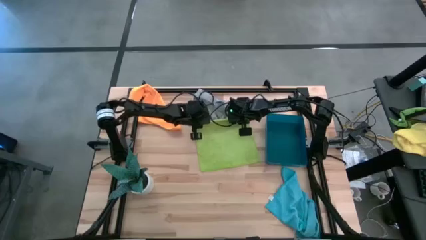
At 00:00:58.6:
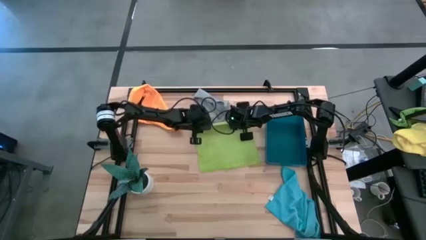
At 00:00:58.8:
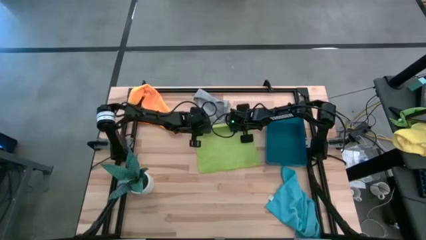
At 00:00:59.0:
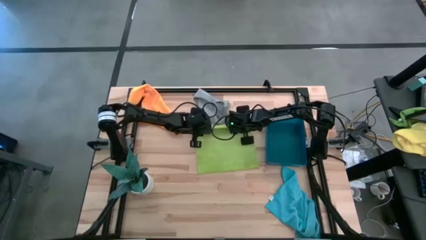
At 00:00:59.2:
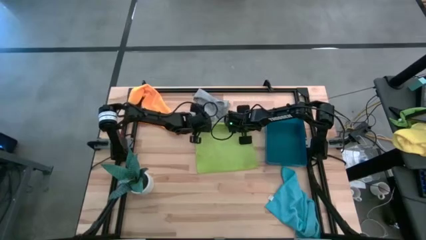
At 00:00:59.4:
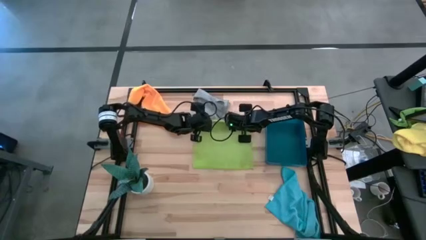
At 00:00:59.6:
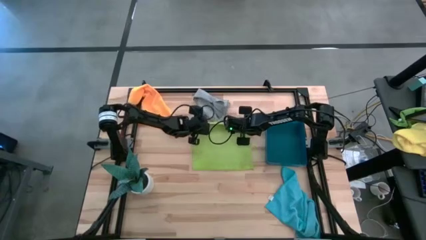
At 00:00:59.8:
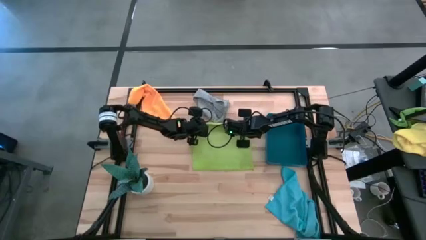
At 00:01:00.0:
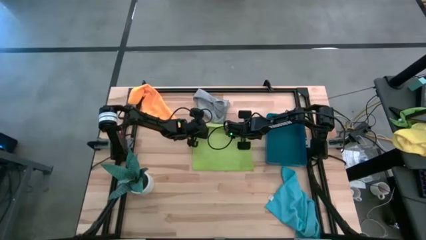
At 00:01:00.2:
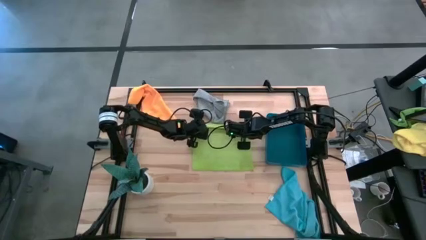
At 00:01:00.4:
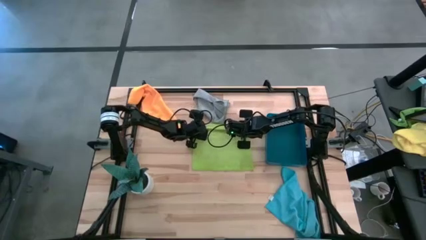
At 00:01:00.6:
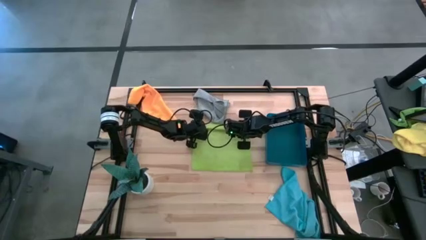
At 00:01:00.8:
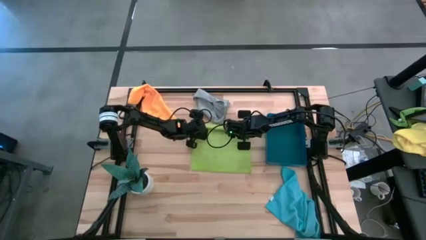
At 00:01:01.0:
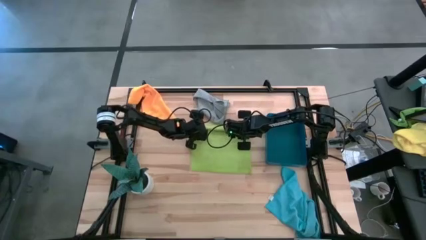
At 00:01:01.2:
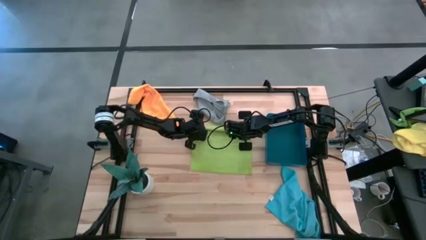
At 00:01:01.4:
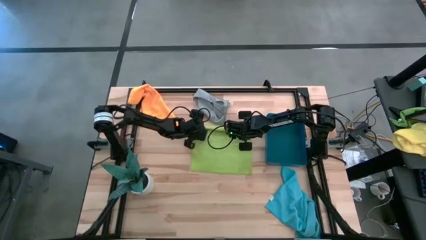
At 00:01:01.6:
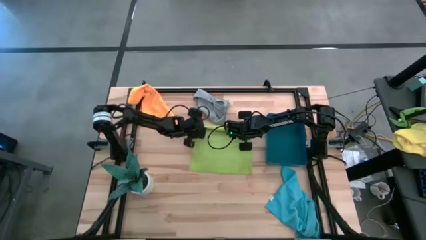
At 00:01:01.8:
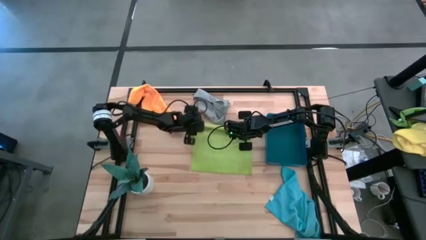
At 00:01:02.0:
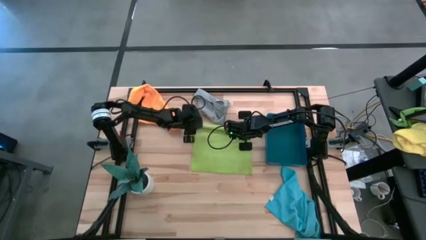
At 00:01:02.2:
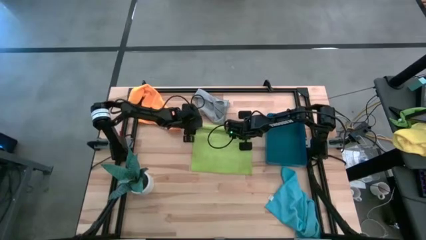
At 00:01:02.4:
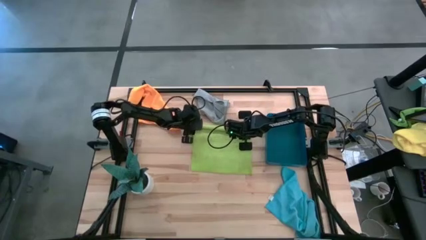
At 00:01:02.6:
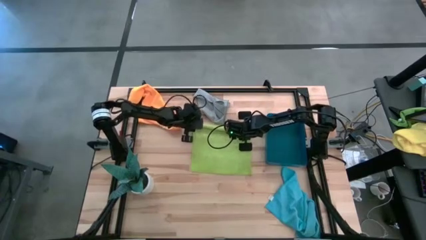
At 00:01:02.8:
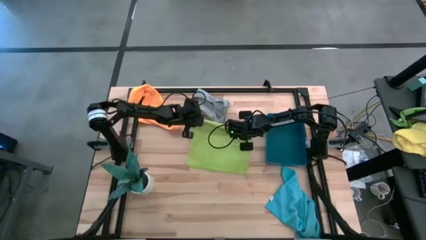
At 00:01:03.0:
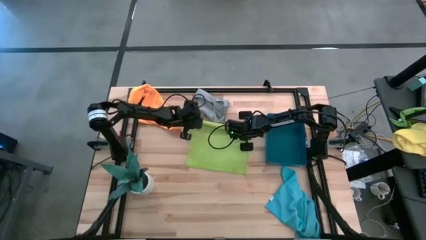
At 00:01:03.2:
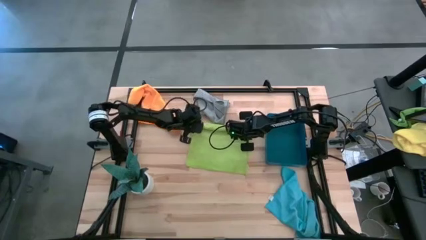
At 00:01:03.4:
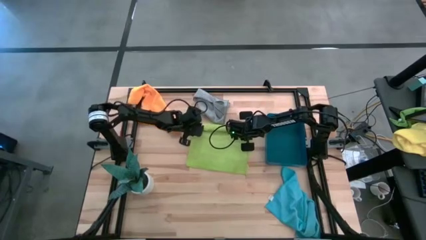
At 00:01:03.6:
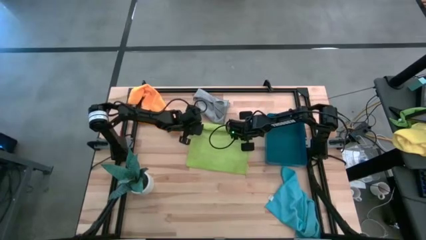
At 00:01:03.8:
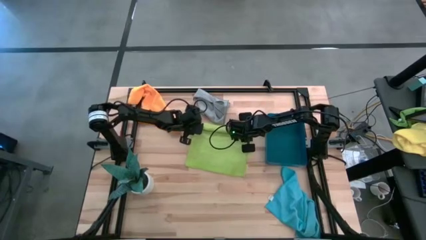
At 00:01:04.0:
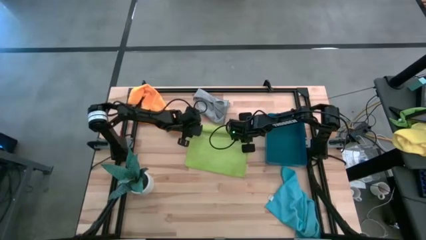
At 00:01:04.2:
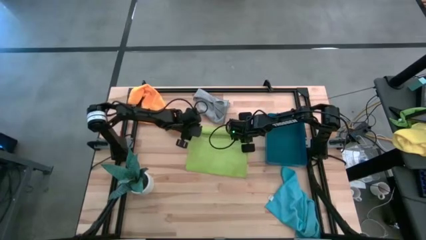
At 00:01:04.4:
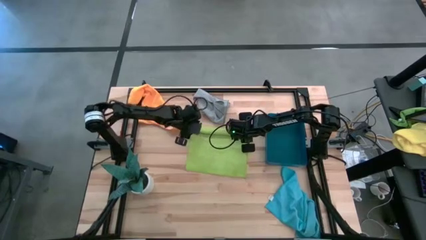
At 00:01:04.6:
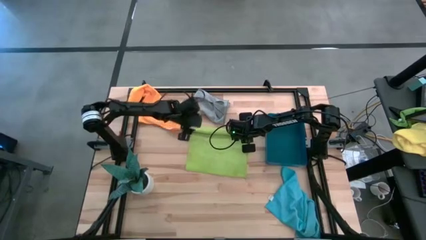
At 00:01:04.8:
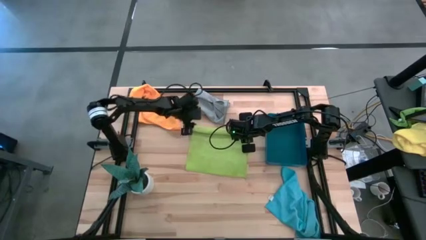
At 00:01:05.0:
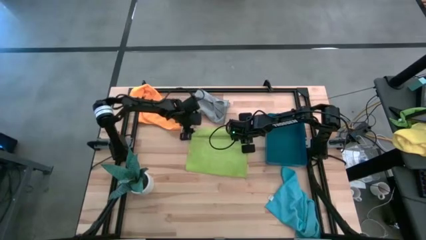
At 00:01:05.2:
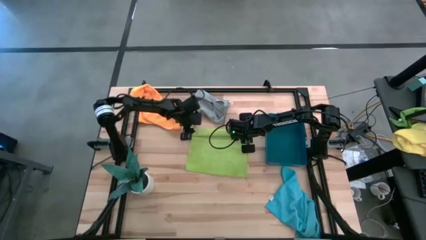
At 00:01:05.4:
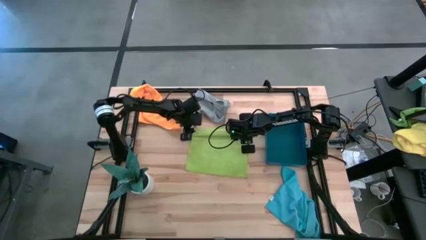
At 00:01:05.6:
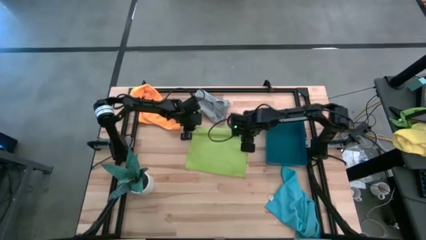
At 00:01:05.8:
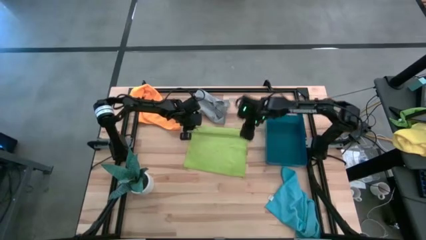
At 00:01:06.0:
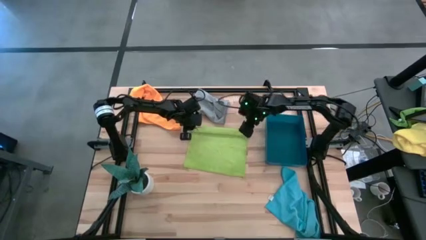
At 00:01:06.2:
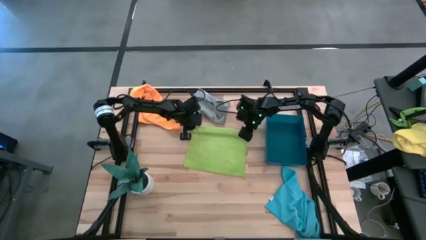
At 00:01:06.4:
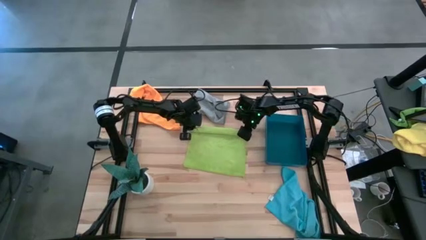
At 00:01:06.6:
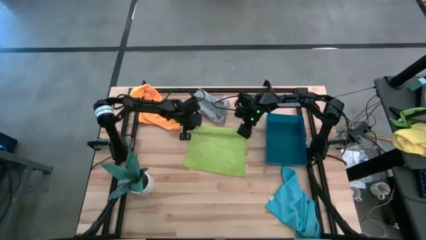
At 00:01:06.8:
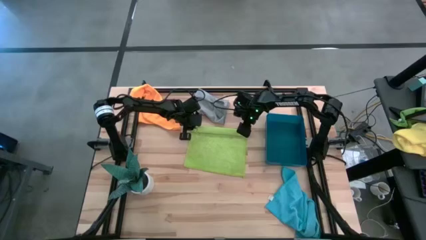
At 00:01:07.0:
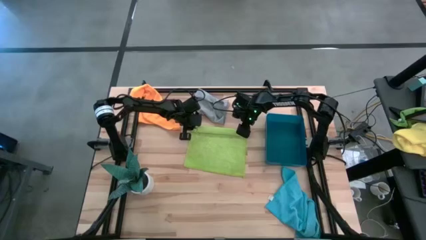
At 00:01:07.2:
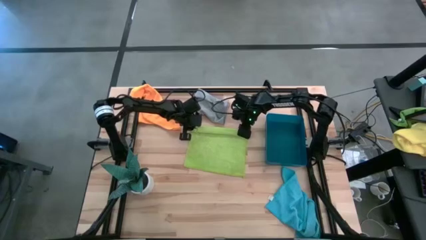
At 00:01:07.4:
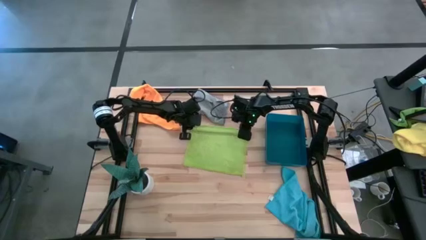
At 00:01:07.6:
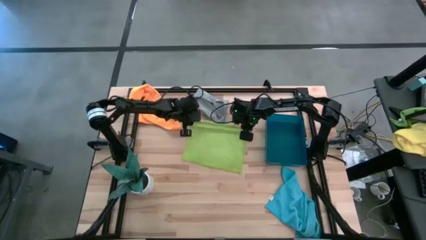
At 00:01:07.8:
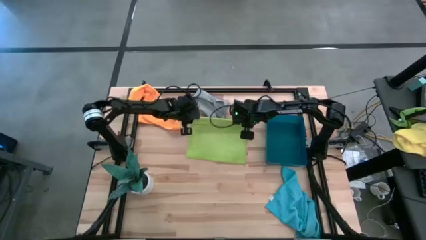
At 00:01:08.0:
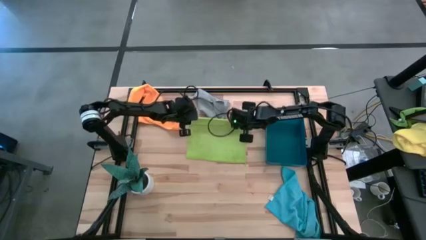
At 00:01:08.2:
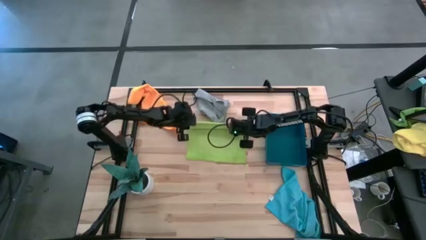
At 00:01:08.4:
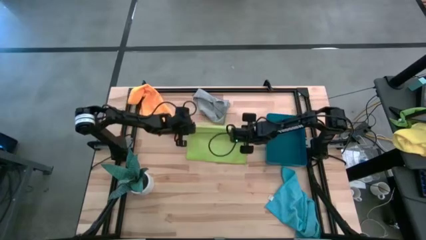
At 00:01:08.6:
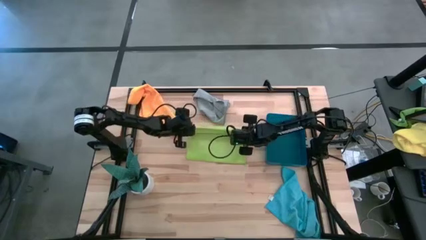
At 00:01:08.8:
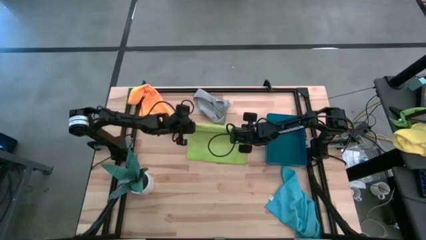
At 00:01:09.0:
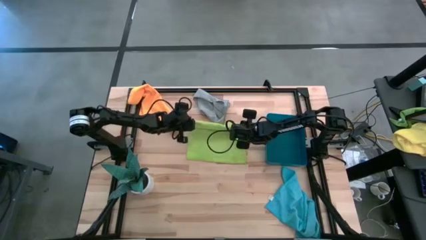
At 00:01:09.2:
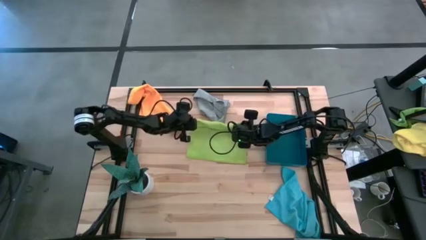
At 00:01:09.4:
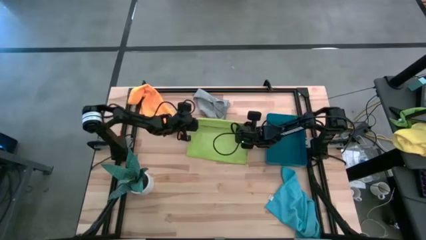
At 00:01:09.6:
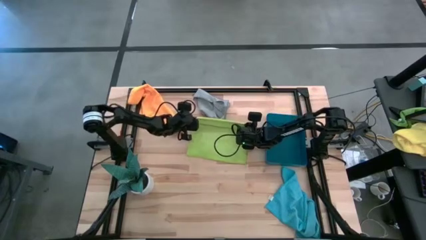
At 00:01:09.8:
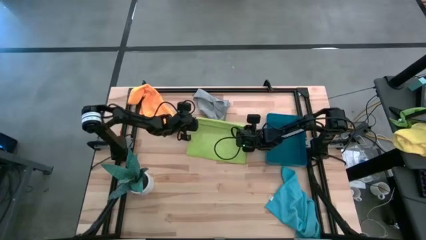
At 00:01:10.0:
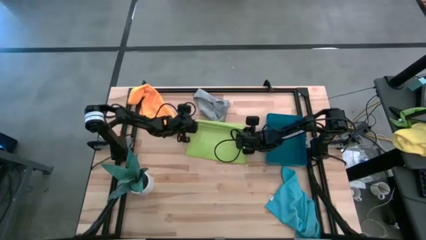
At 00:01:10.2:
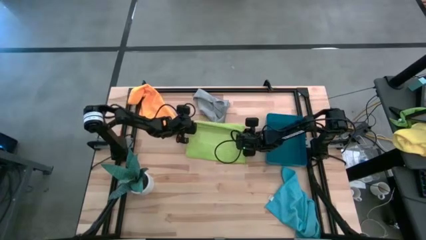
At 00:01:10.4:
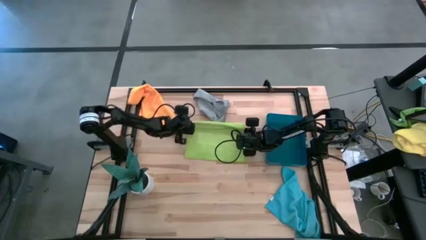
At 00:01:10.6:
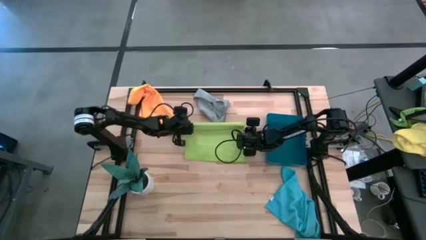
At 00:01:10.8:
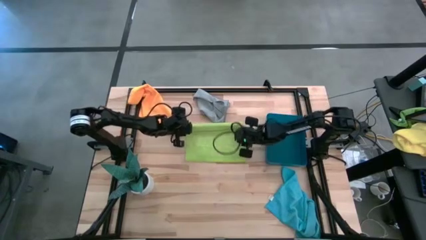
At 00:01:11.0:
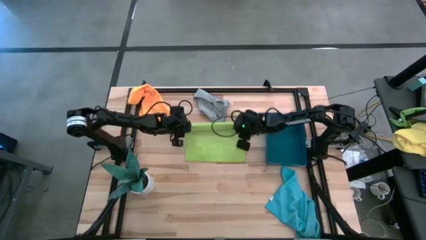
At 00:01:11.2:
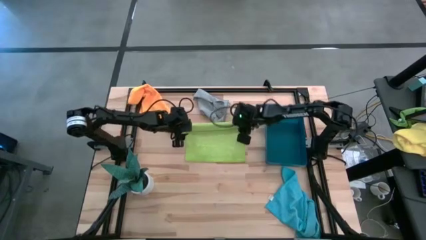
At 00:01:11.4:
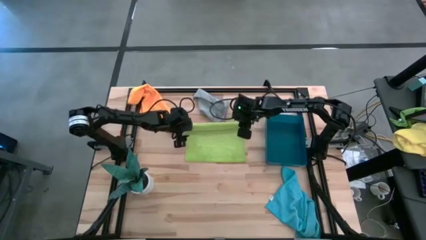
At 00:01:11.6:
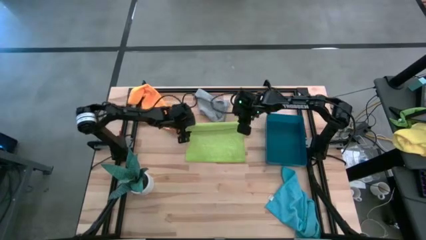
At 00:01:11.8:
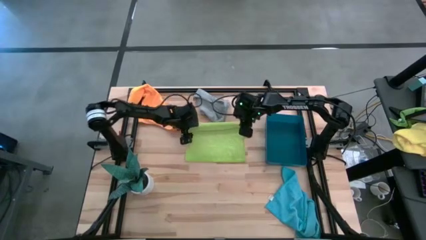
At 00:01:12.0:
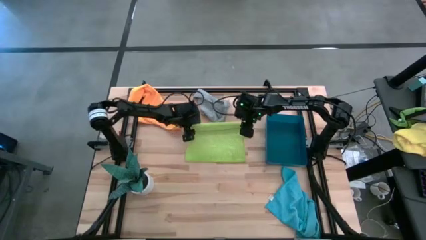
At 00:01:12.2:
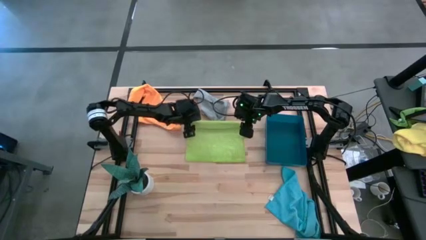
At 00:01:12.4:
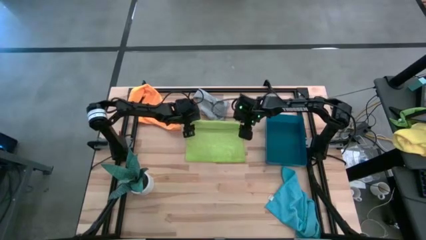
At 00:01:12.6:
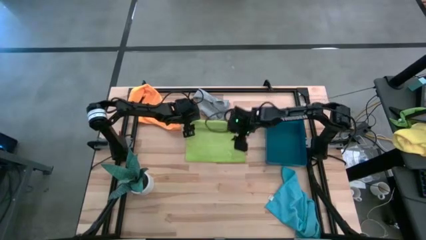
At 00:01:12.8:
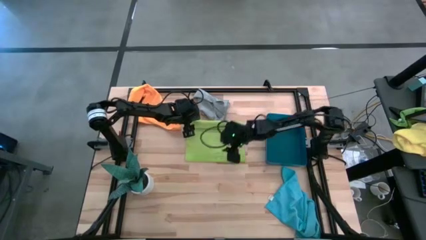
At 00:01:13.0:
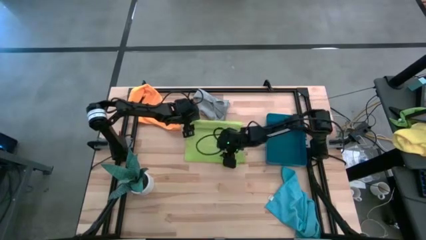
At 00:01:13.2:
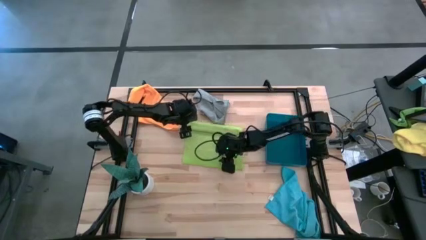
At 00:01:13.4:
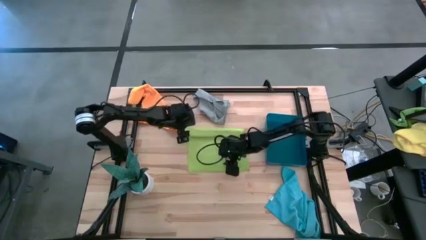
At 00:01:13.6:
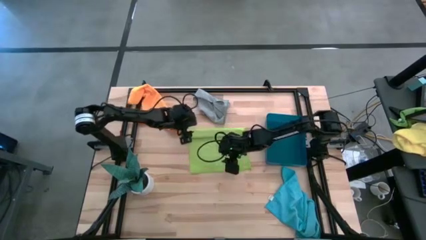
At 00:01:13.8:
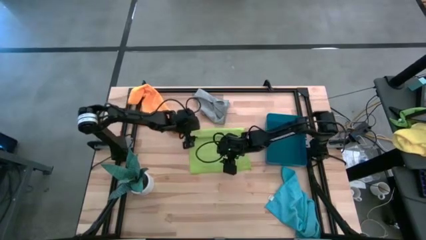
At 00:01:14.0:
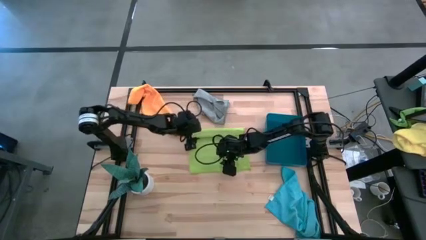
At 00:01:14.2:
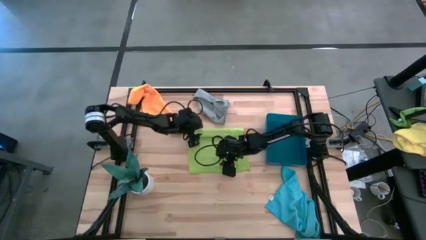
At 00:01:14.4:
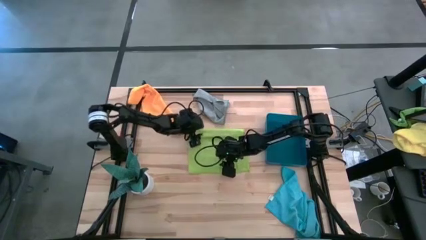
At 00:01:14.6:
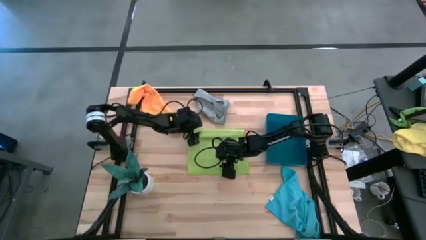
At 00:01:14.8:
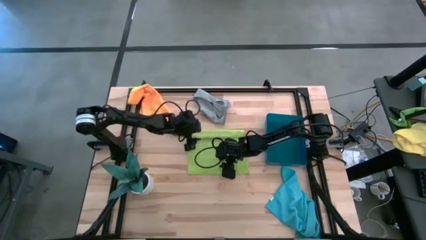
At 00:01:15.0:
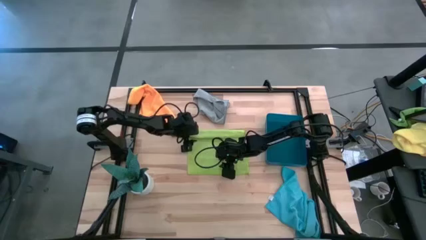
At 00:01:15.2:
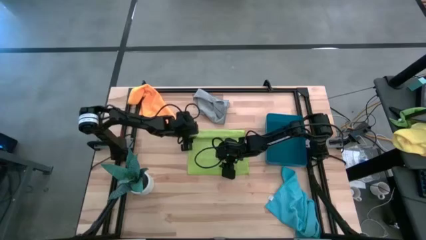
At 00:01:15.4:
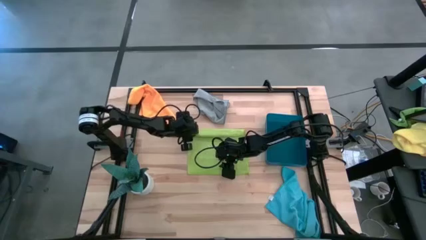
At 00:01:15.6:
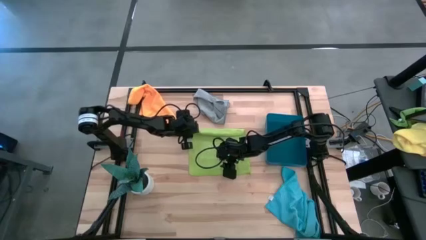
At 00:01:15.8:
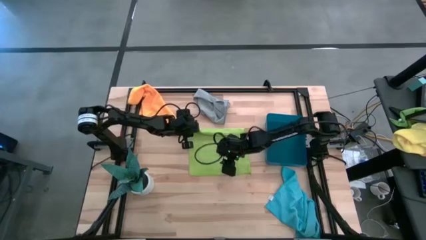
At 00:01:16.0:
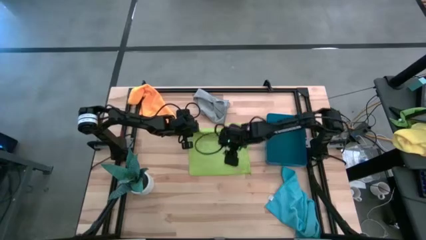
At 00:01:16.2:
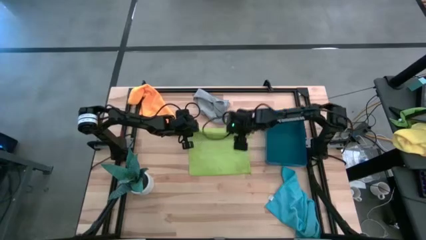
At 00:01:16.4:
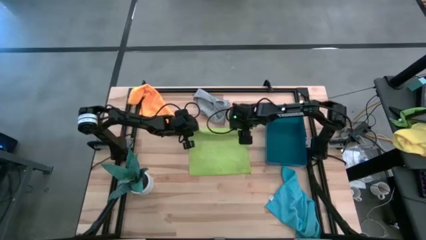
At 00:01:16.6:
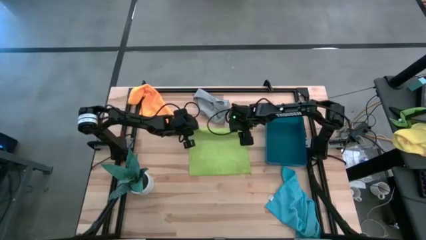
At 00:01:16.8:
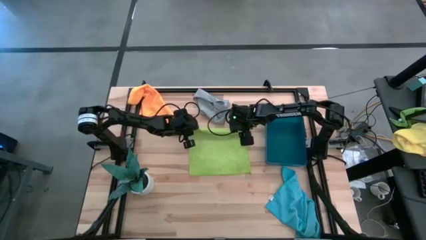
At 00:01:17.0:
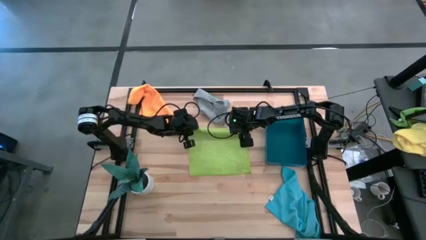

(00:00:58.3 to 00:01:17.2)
Task: Roll microfiber towels into tight, uniform cylinder then place into a basket
Roll the green towel
